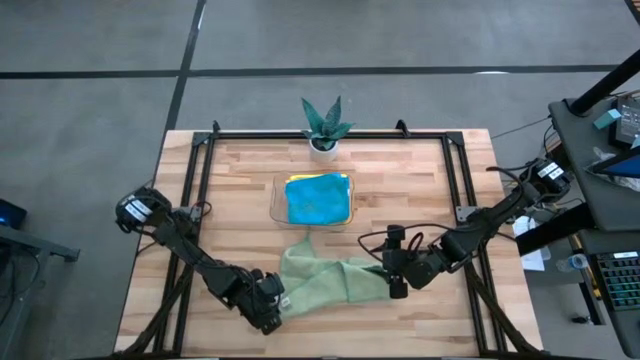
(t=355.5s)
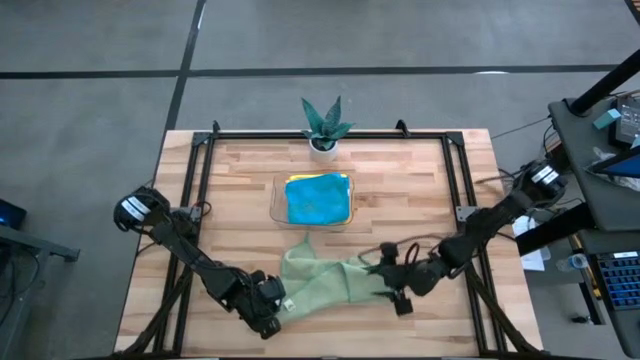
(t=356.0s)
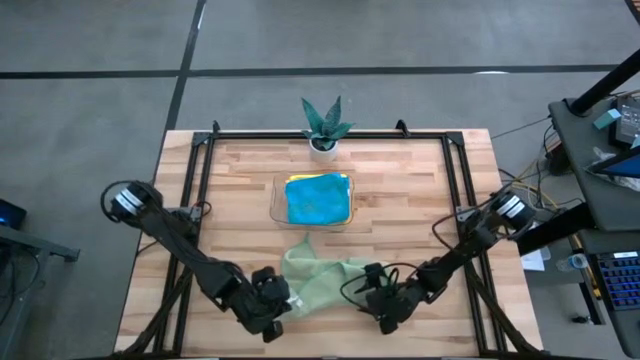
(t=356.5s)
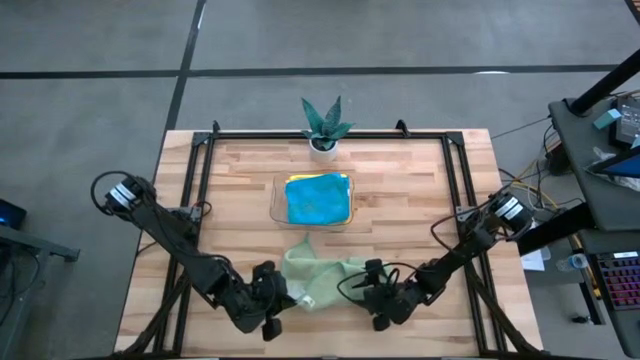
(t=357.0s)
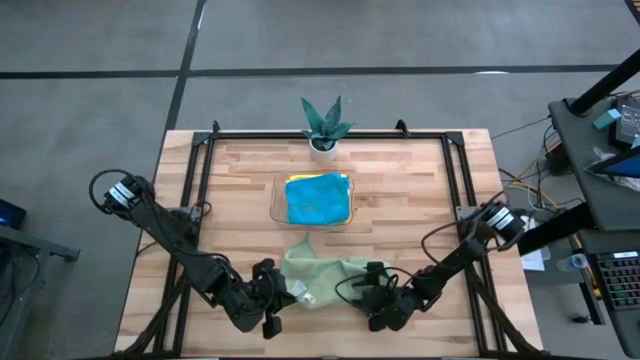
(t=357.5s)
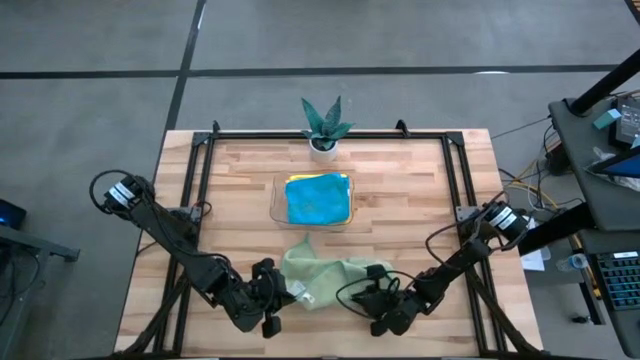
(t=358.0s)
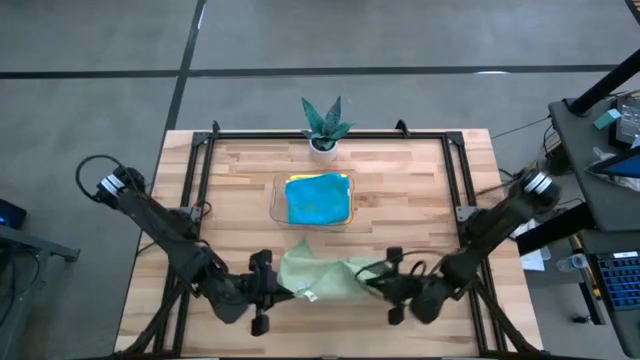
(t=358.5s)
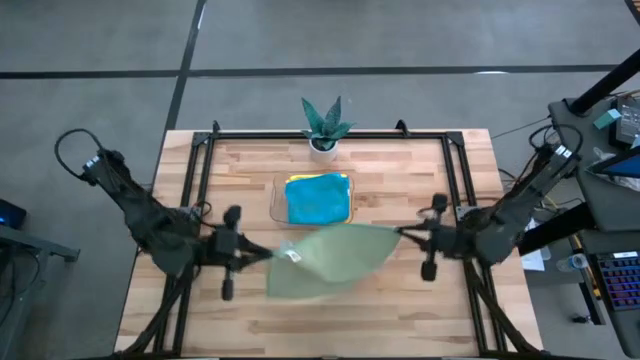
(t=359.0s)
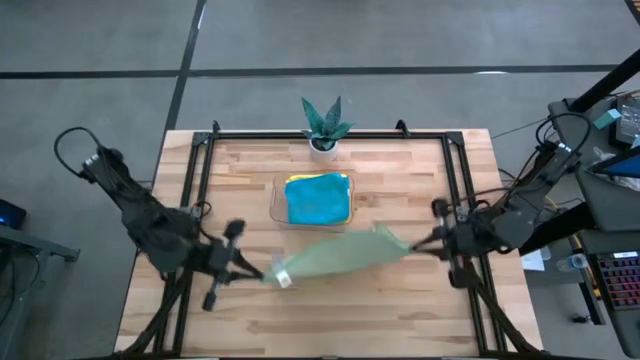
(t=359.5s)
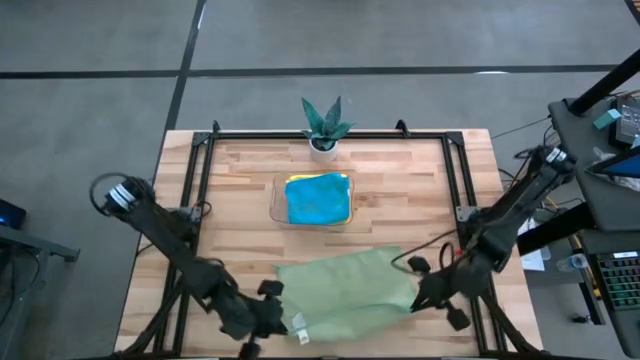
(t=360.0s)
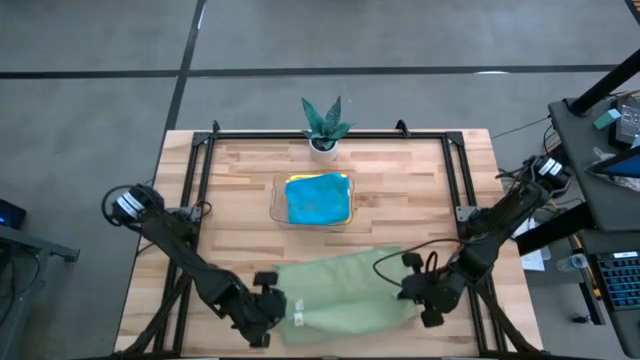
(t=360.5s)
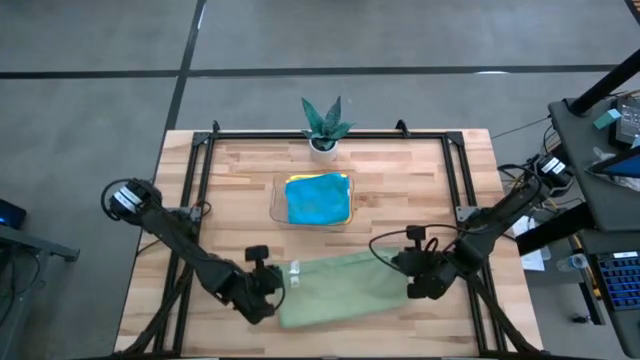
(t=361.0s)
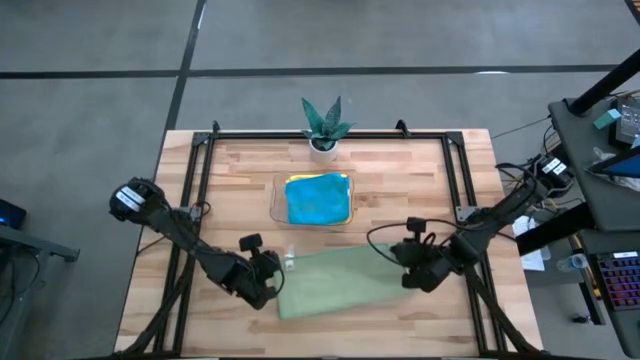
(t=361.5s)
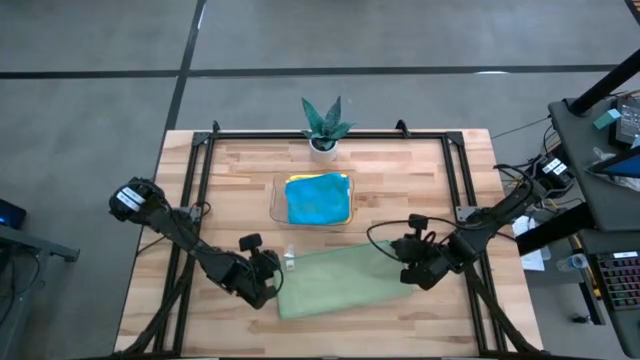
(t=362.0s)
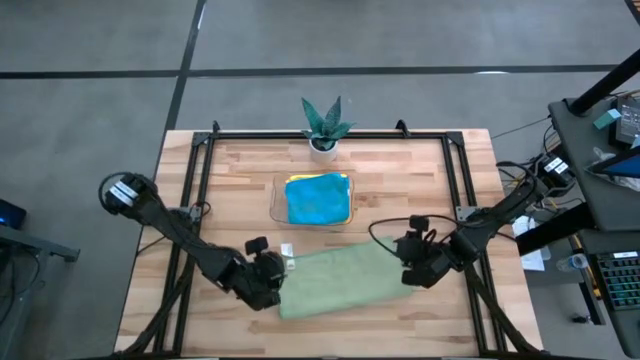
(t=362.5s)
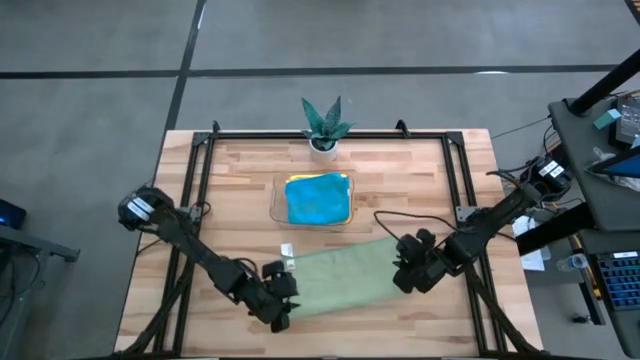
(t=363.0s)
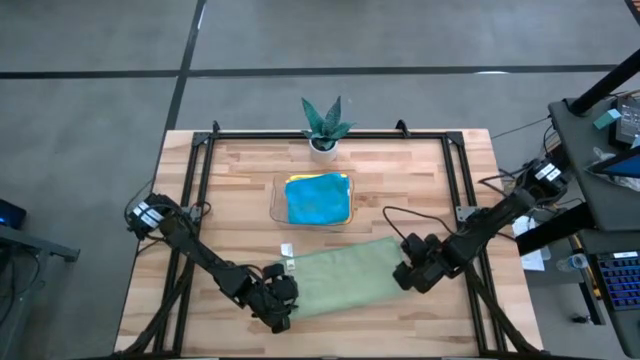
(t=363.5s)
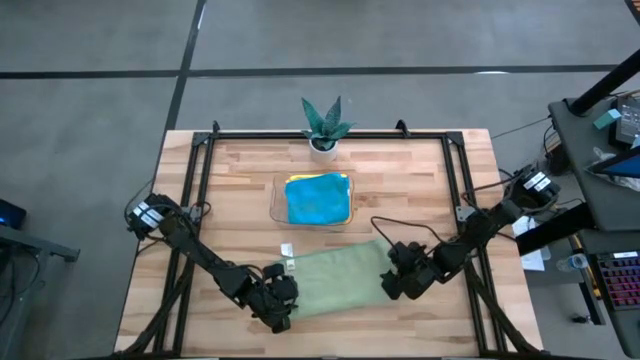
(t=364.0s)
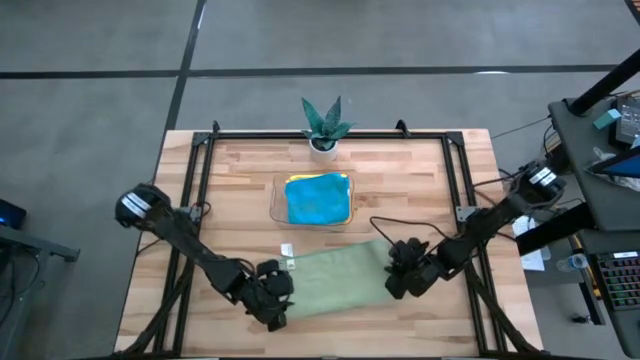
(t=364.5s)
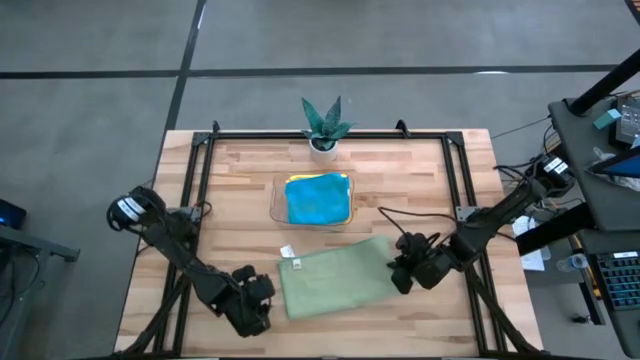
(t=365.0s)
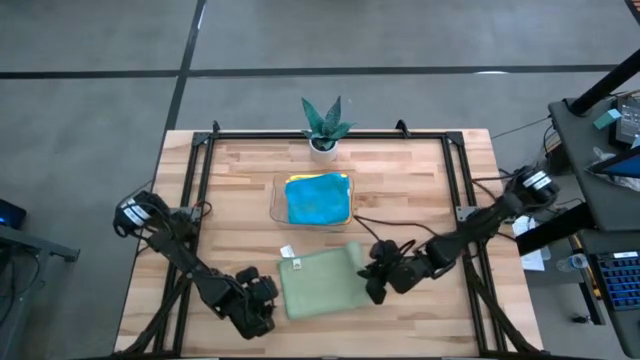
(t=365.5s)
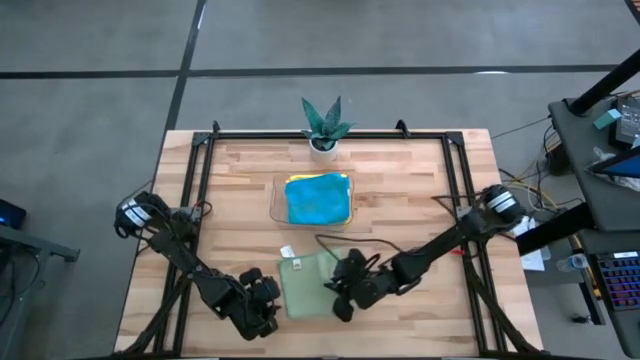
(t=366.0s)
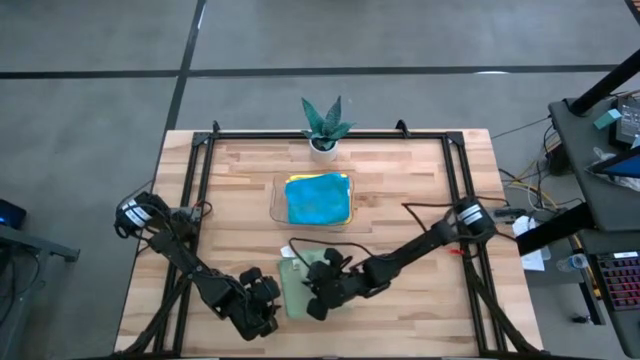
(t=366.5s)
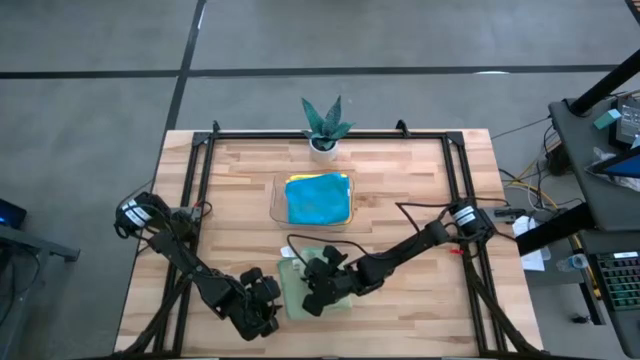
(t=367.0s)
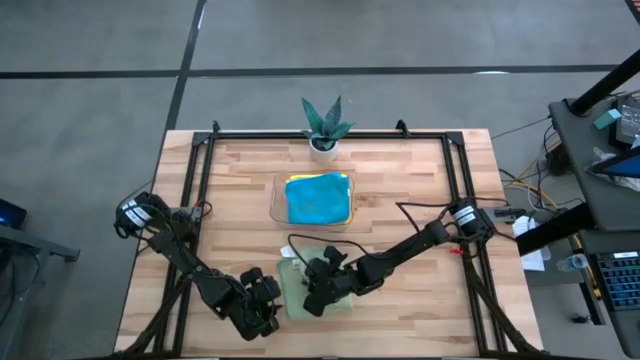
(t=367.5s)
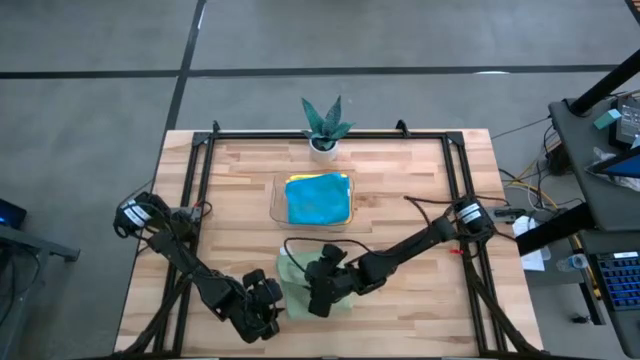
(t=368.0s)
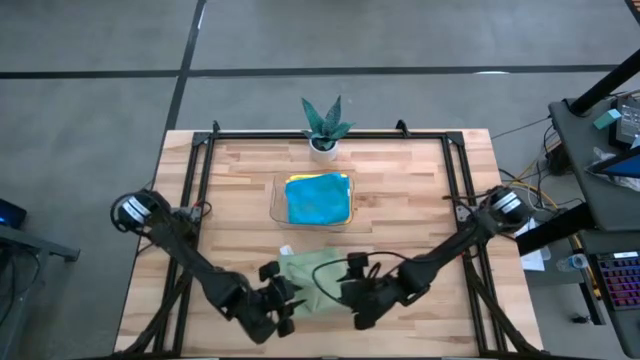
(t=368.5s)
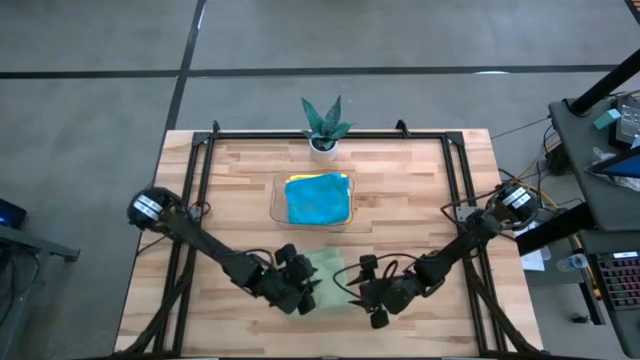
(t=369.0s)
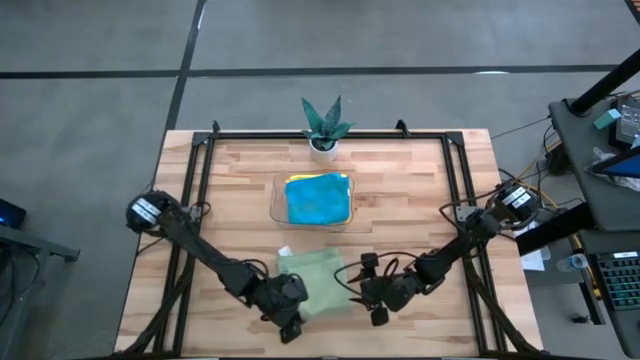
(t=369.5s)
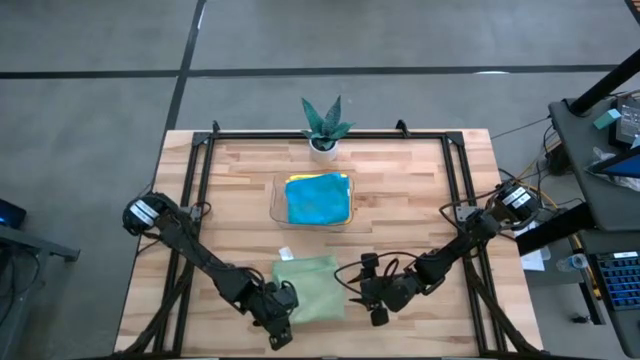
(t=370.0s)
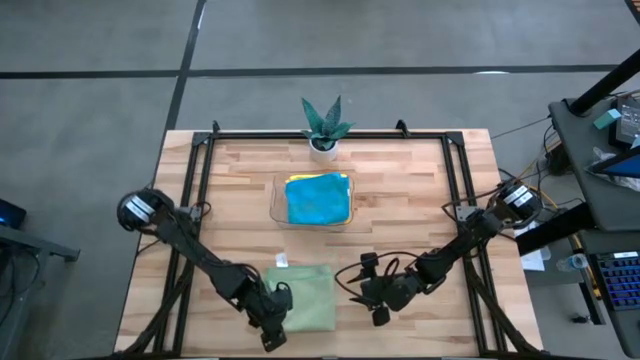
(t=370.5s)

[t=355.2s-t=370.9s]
Task: Fold microfiber towels
Fold the green microfiber towel

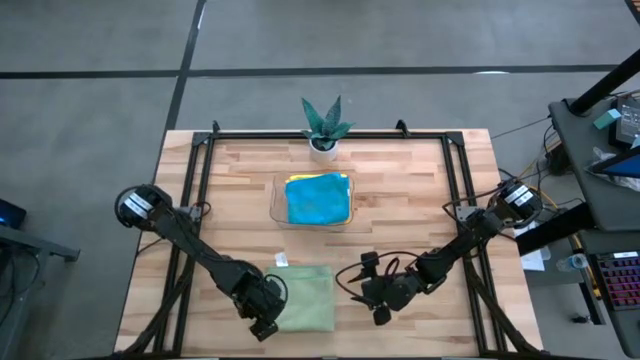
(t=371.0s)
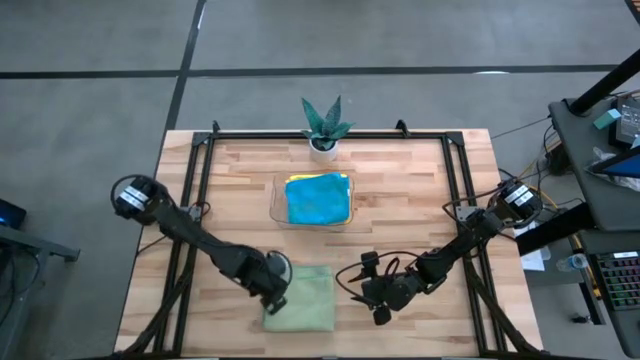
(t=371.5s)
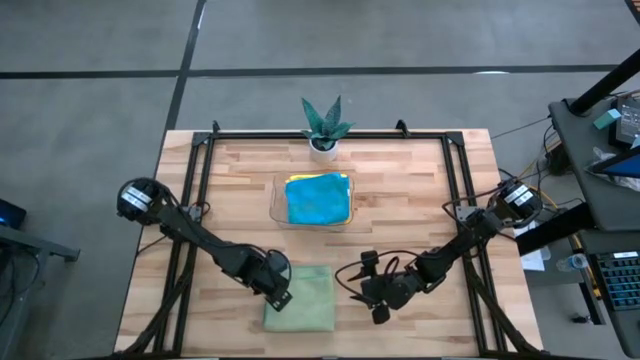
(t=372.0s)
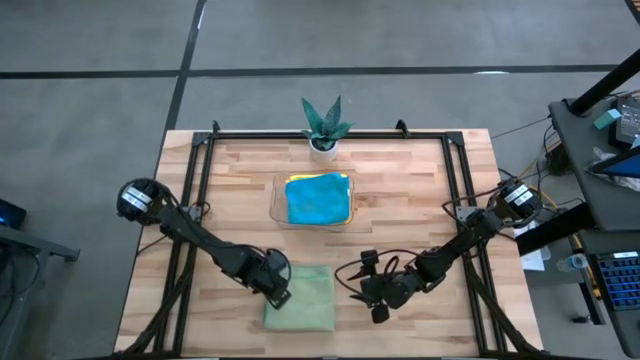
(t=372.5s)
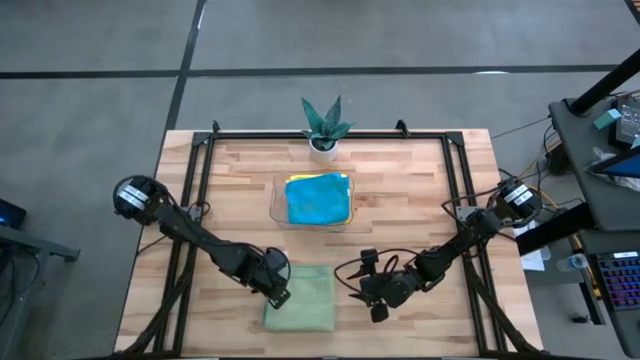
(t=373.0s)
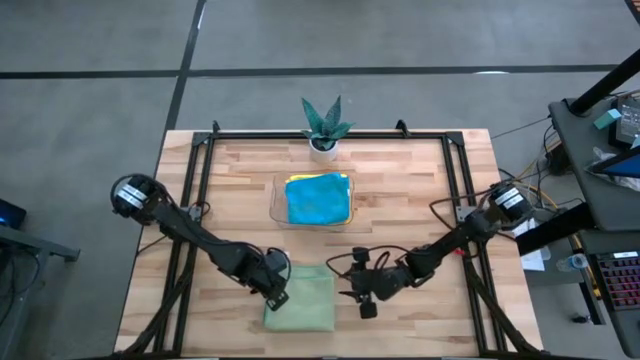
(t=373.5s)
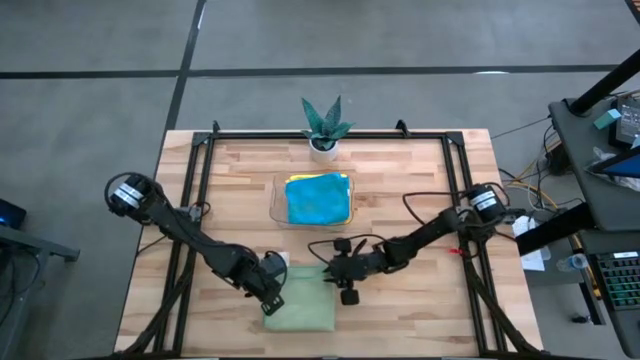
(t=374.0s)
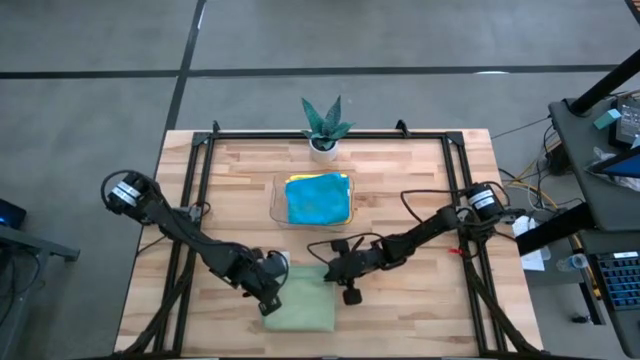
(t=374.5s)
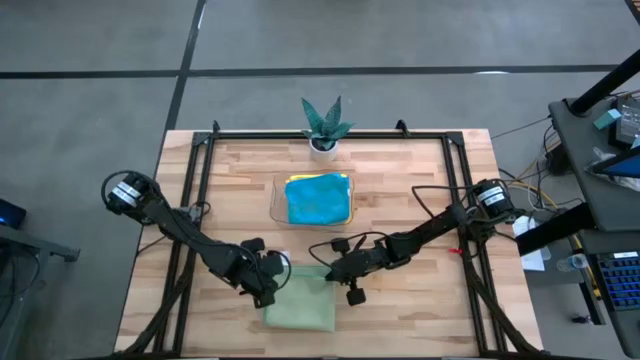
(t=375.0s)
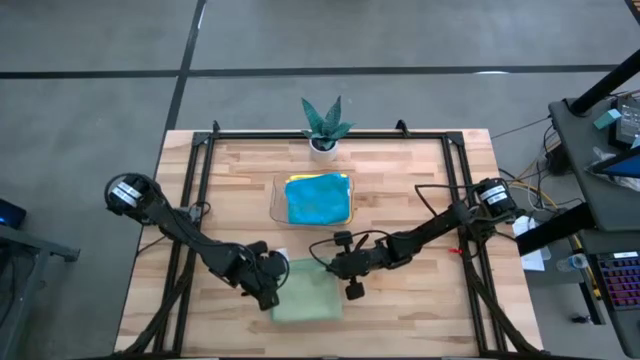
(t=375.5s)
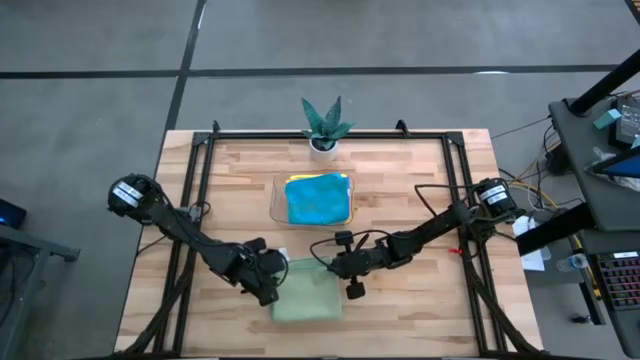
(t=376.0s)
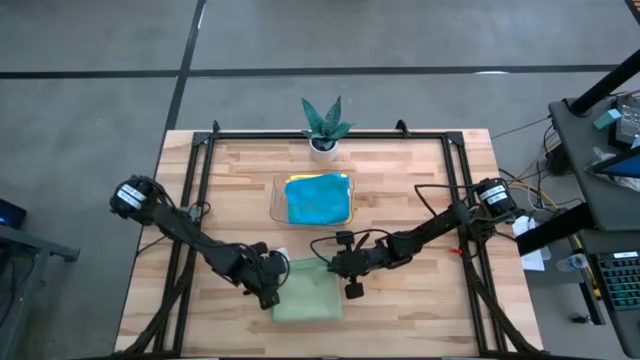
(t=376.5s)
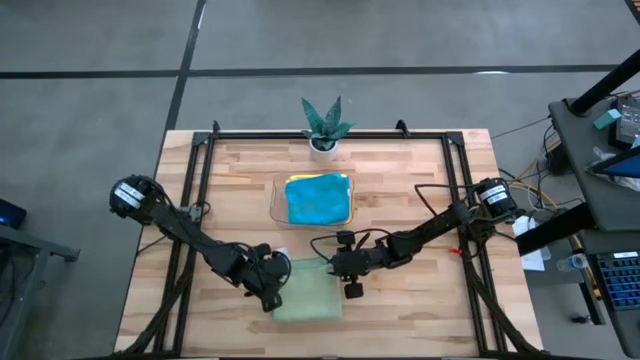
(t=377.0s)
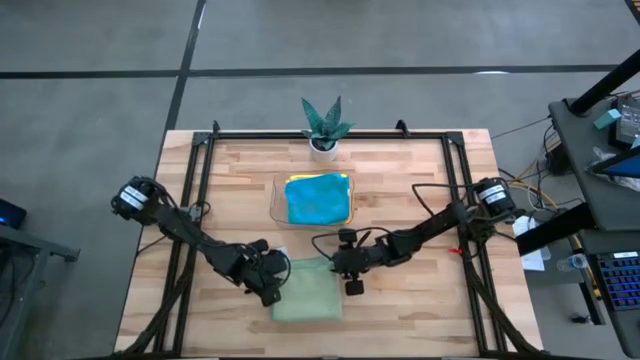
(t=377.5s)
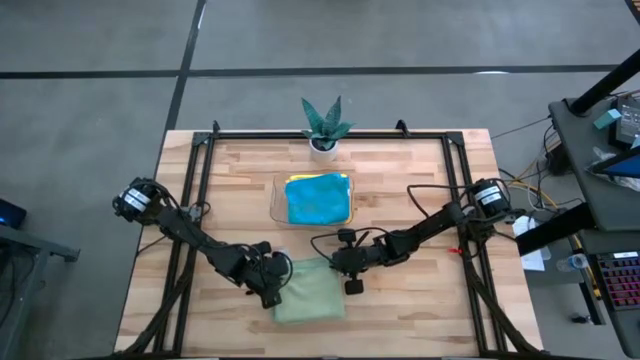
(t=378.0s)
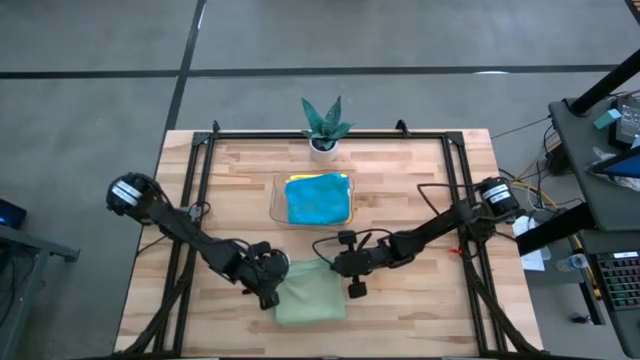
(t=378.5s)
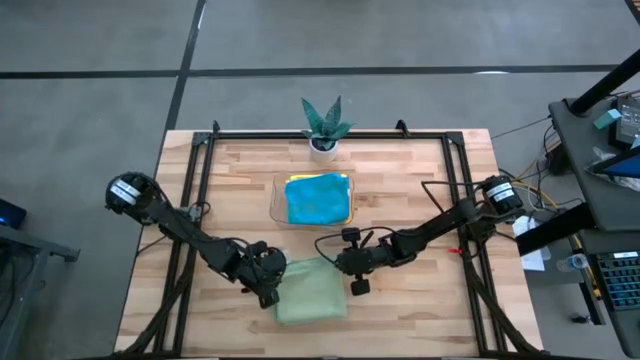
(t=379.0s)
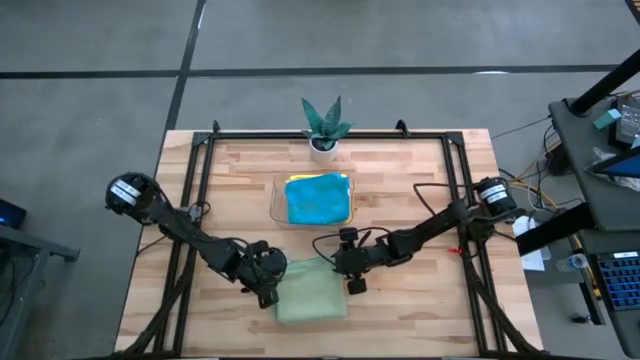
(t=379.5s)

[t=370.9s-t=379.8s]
Put the folded green microfiber towel into the transparent bin
